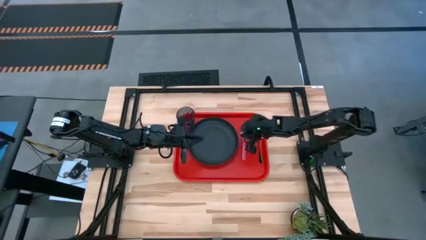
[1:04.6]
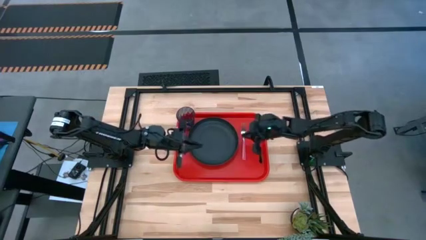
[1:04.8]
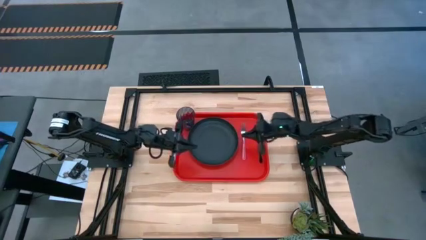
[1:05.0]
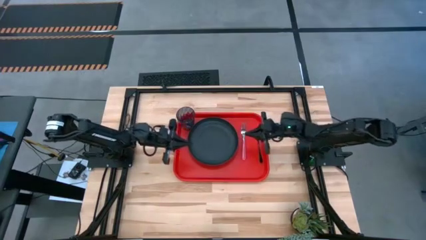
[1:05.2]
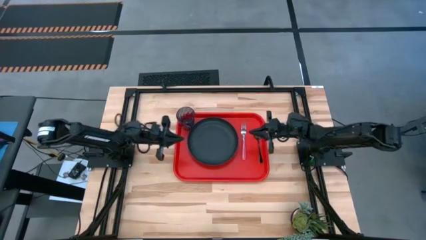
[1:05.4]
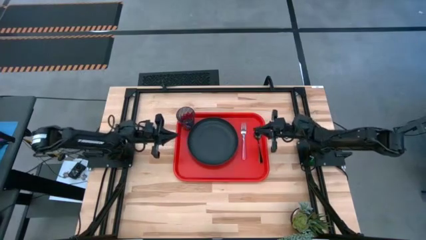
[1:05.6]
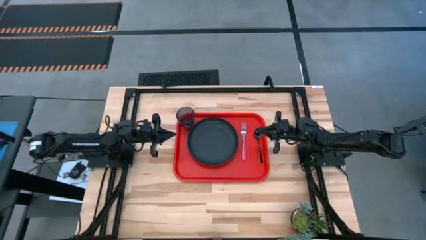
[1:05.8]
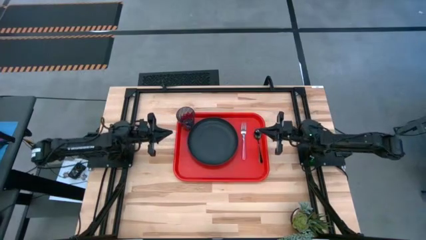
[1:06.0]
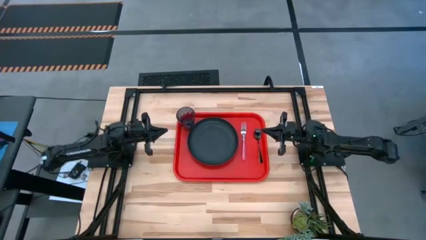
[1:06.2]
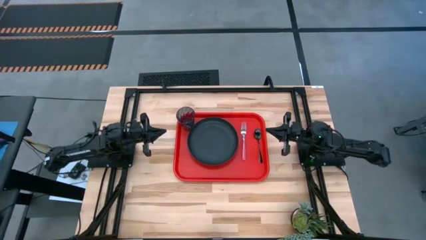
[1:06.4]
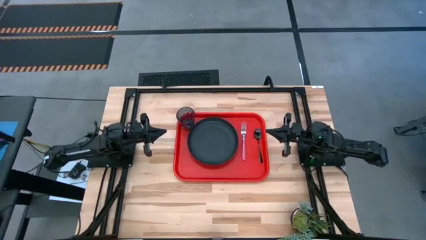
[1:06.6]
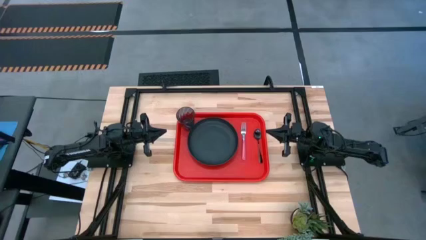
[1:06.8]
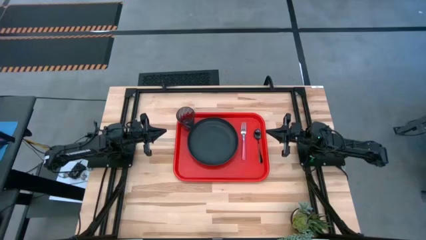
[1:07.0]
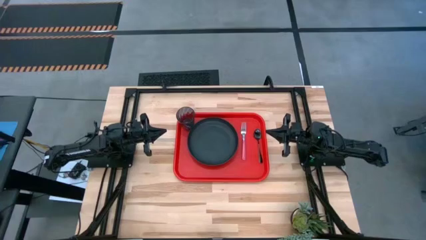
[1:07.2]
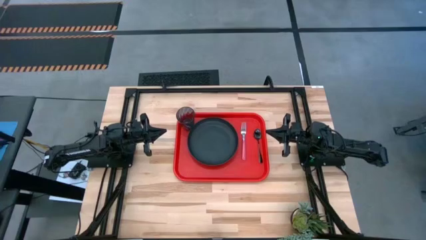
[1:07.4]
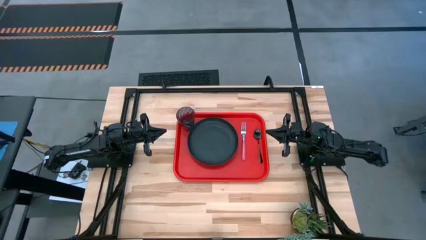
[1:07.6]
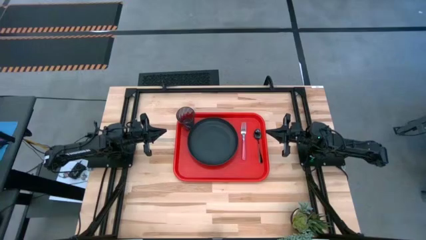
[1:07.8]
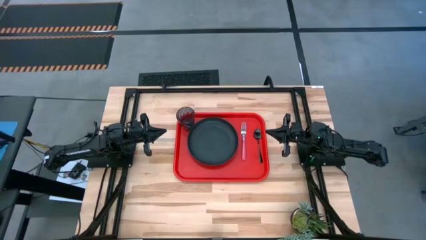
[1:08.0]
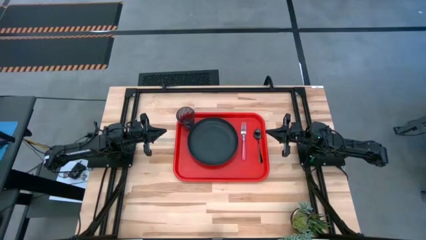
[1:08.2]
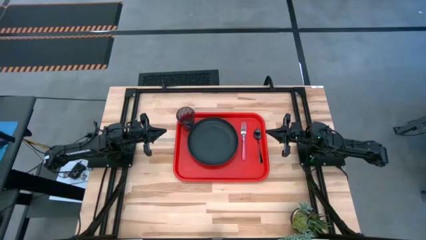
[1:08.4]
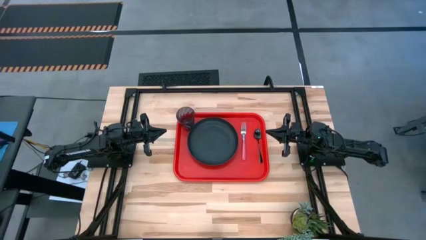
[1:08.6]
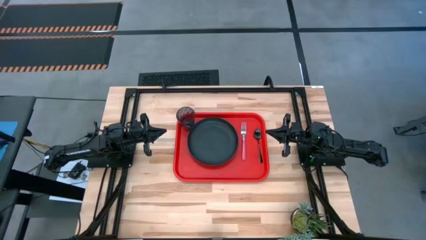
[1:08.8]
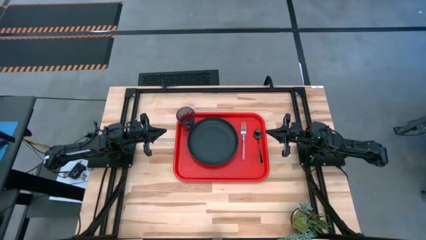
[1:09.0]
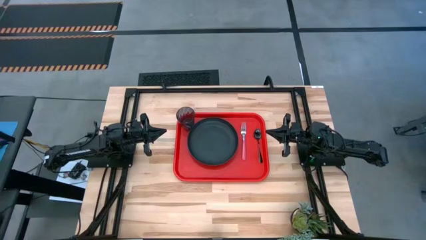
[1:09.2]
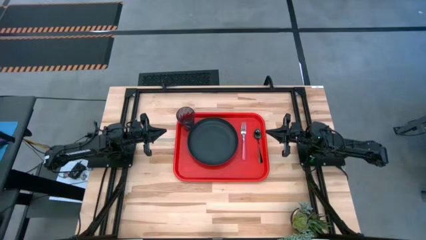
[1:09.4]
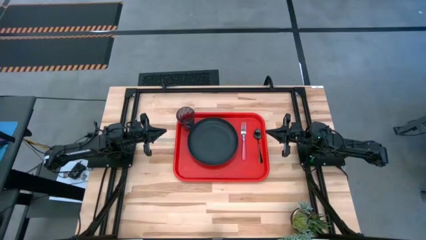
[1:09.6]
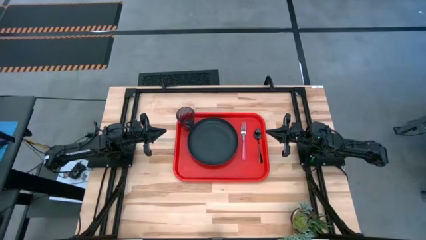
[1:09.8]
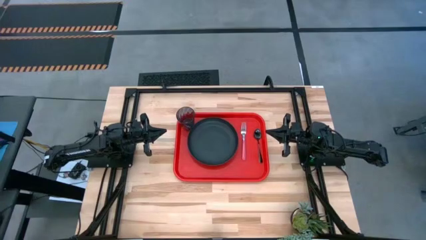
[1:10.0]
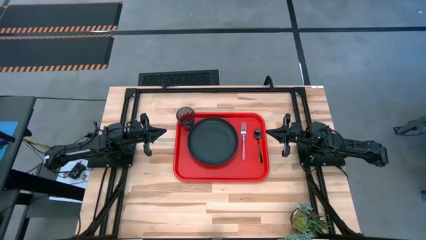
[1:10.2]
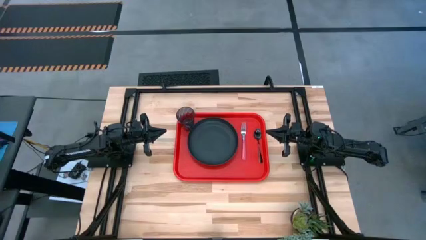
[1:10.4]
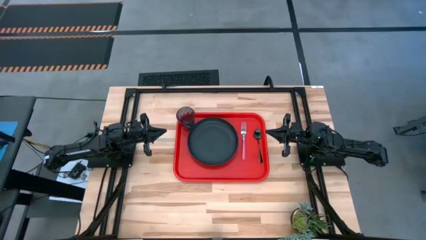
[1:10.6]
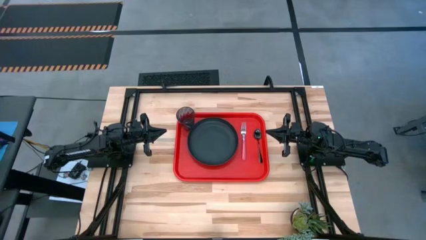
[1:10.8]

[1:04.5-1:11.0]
Task: Pick and place plate/cup/fork/spoon on tray
Return to Home Position

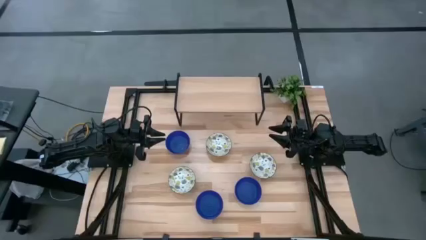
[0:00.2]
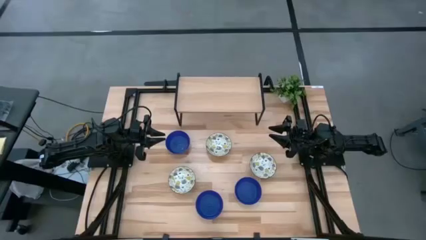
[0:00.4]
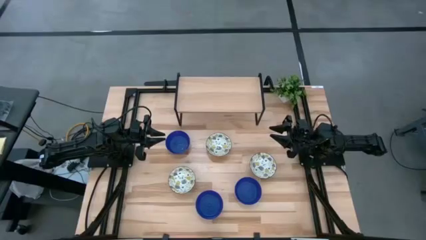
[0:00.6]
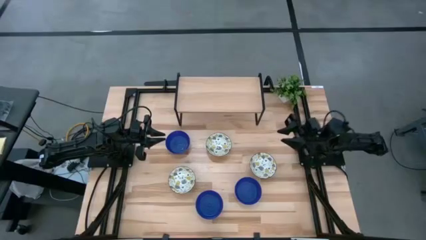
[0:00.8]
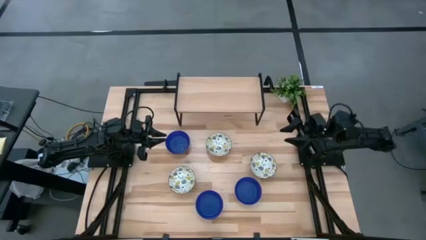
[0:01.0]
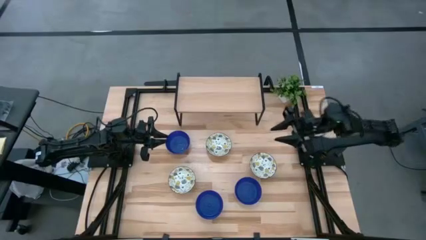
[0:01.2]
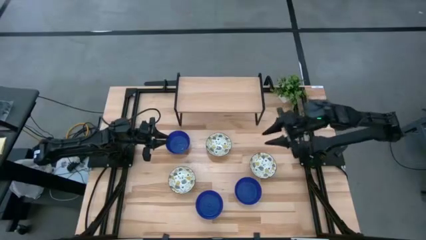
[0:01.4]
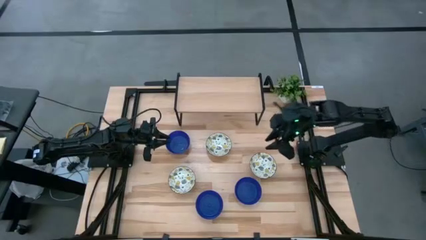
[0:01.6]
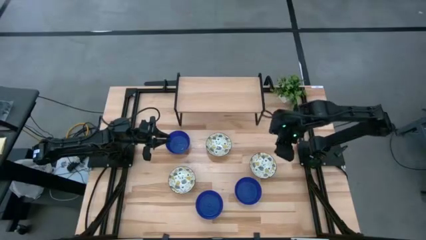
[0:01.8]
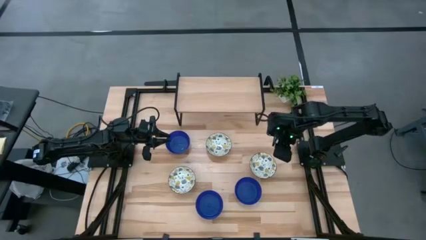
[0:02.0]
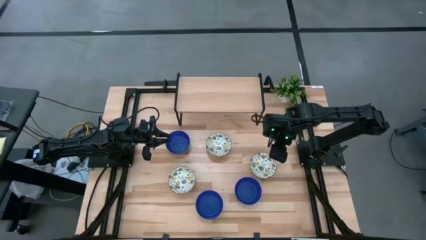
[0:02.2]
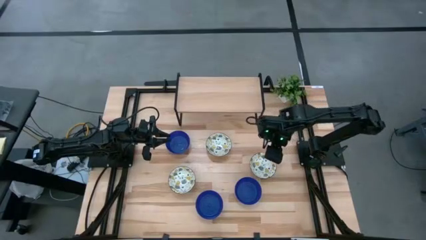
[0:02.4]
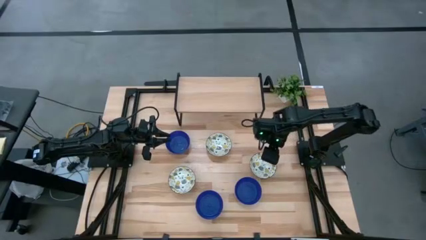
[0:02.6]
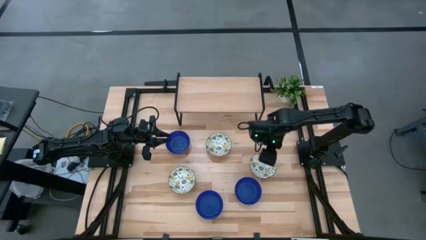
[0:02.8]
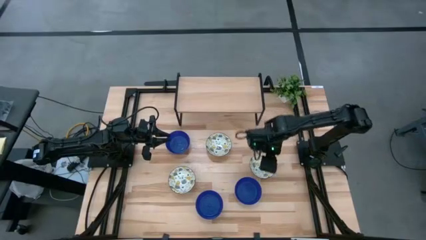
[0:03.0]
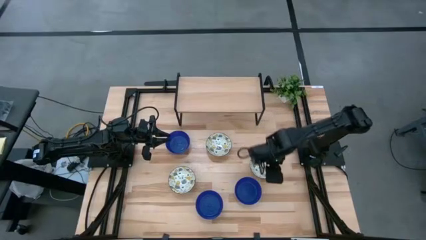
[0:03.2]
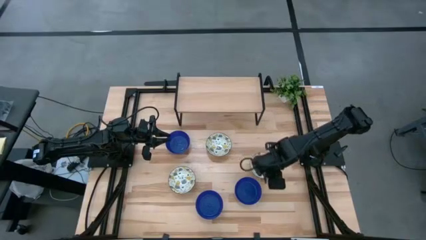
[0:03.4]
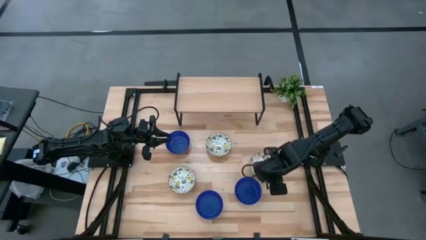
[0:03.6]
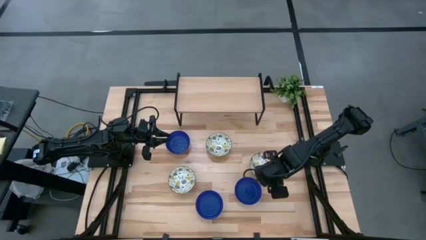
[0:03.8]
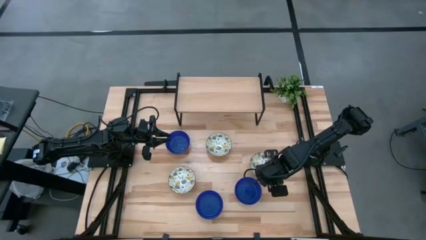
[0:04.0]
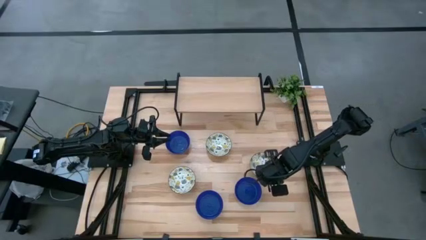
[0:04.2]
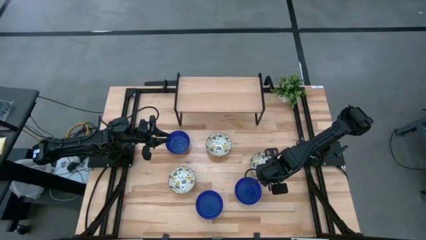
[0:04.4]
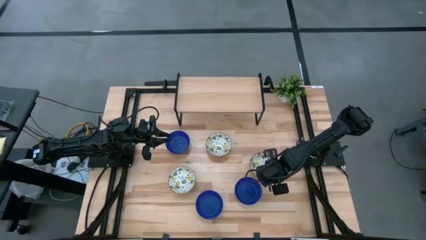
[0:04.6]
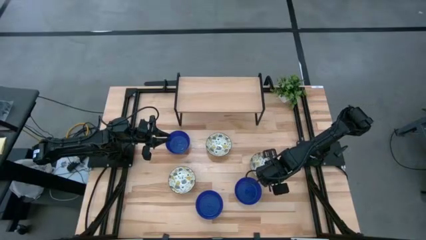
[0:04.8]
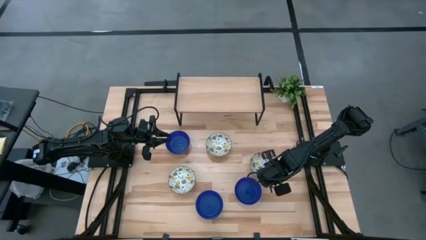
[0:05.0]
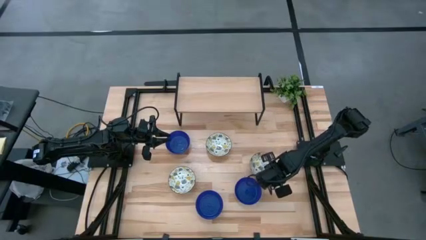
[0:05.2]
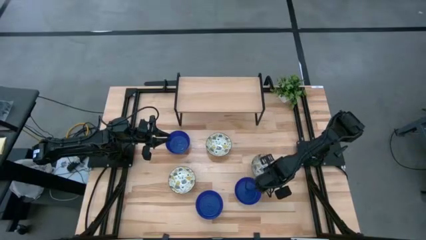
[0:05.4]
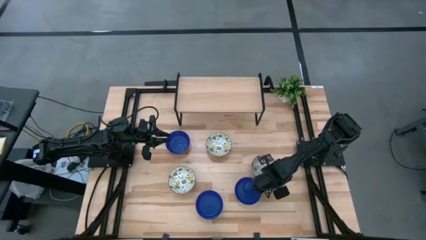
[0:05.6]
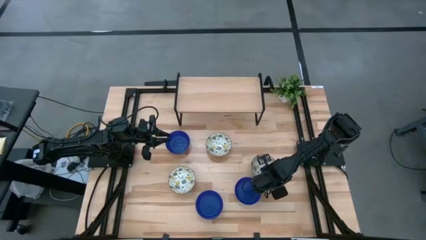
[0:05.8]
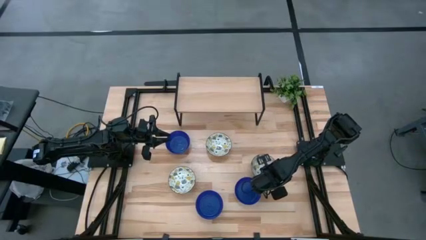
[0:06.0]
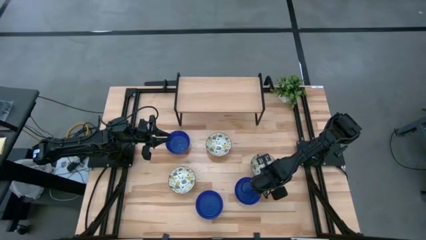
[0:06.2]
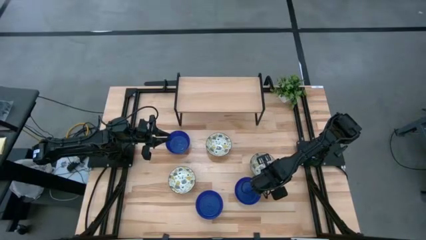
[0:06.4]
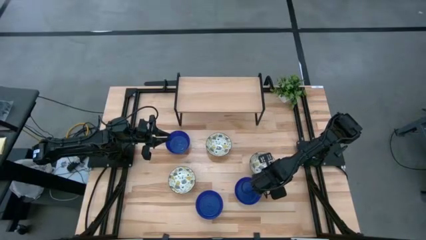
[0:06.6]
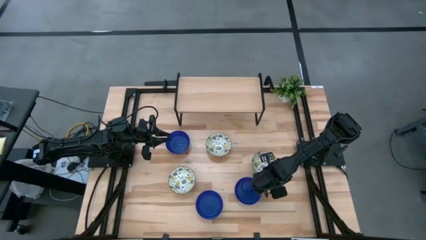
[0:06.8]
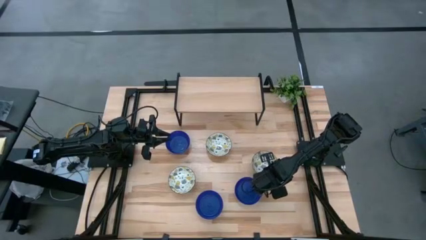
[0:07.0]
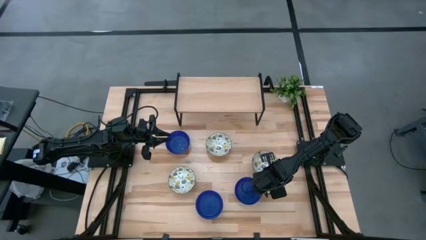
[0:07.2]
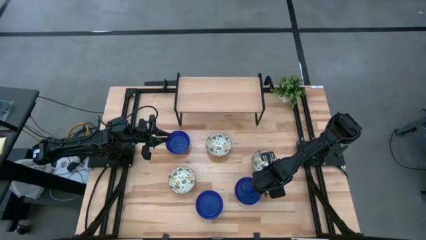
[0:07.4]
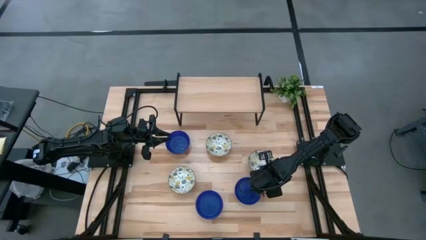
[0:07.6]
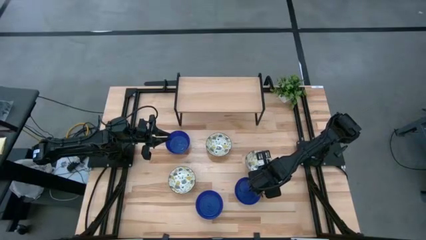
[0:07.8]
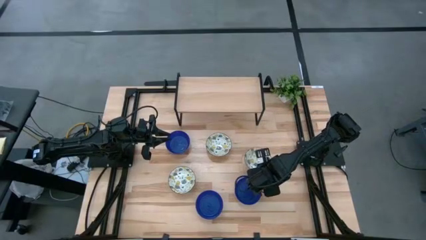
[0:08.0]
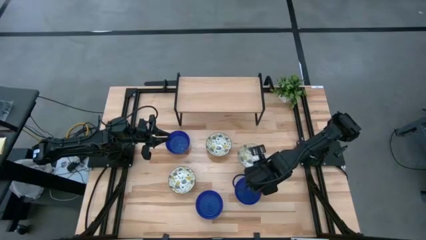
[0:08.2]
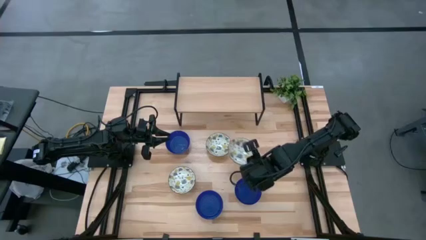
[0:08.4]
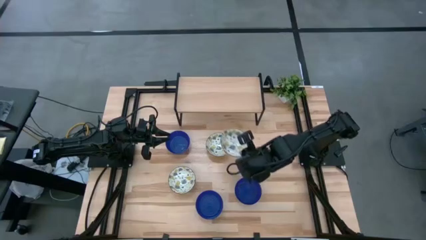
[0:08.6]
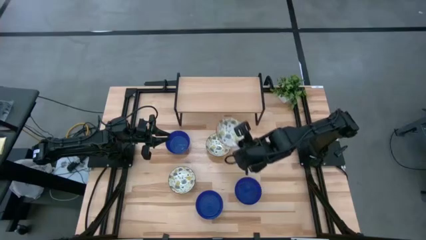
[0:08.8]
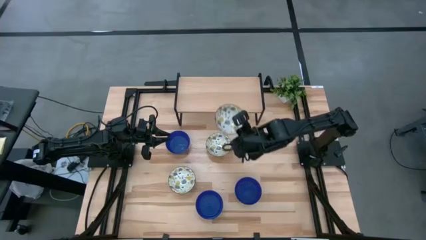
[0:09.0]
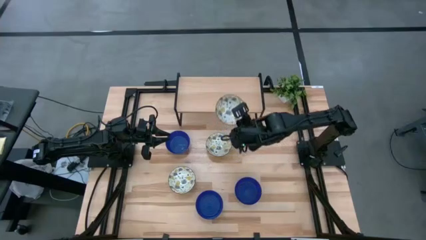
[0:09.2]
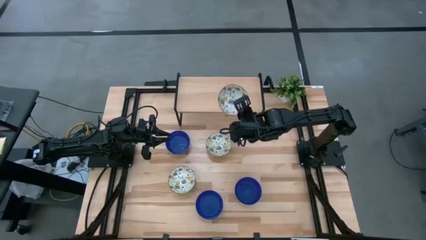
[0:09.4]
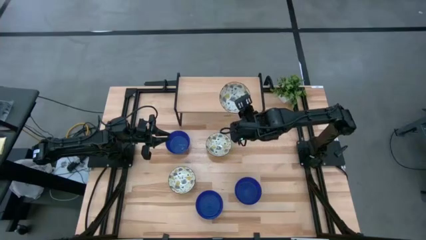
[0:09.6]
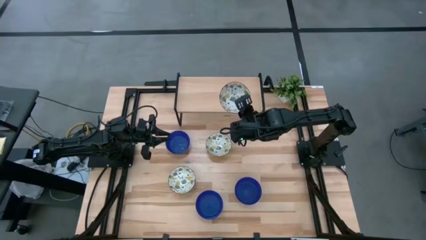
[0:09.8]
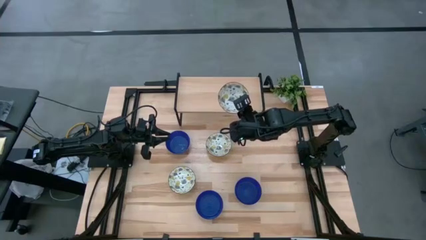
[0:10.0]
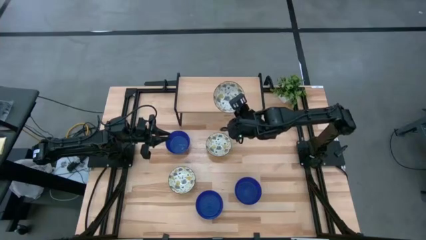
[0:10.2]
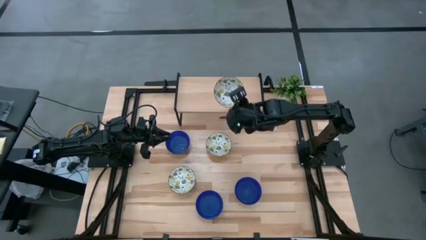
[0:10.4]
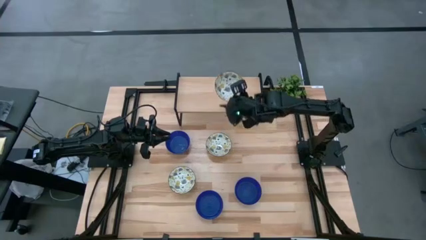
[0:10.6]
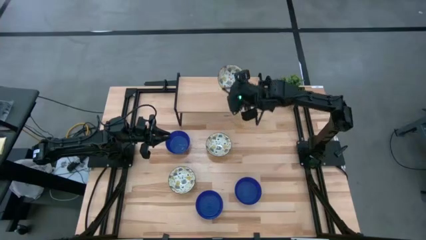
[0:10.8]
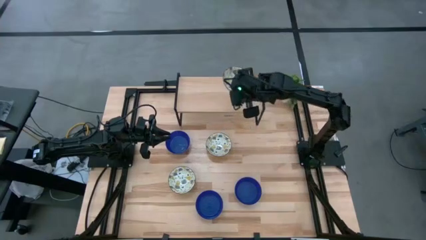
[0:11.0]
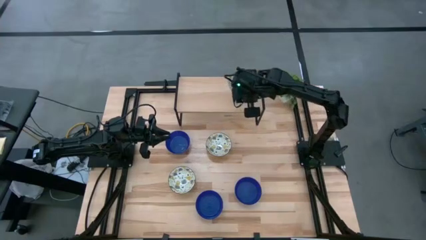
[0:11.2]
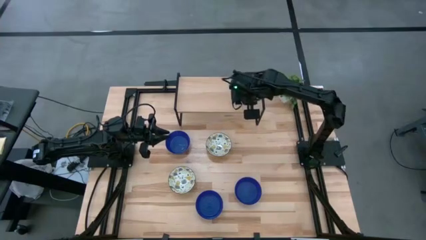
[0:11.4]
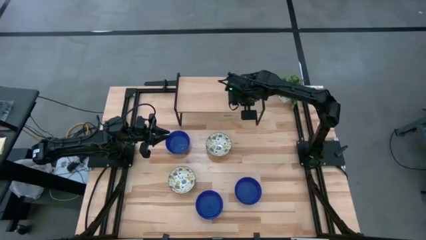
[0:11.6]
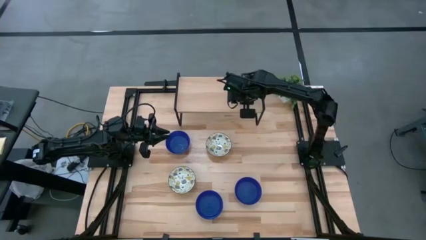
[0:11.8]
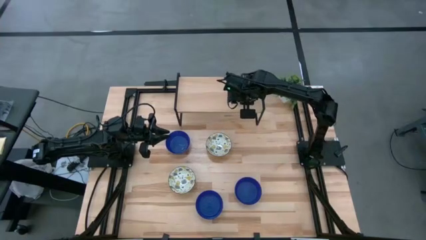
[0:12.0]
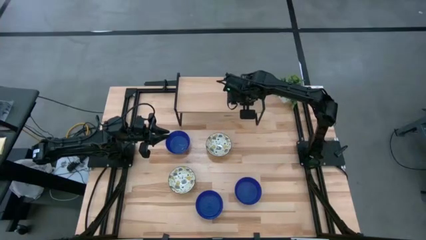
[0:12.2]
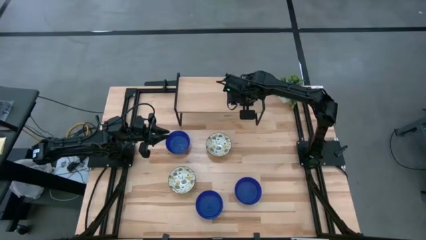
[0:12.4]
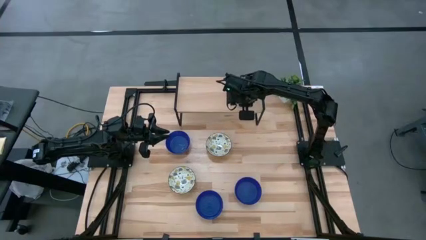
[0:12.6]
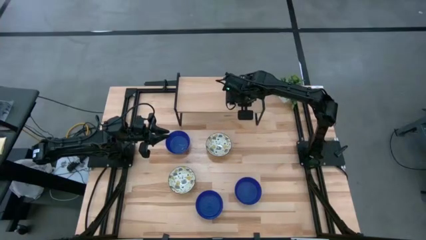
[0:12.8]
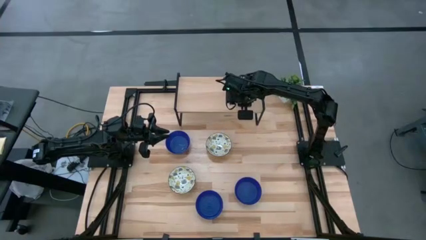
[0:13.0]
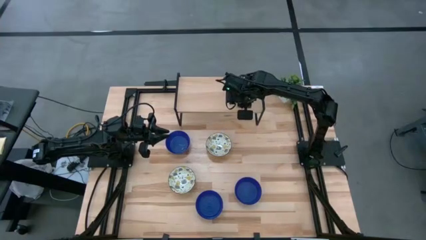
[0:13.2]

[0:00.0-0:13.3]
Task: Pick & Place Mini bowls
Put the right white patterned bowl on the shelf
